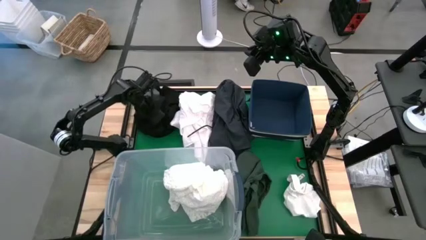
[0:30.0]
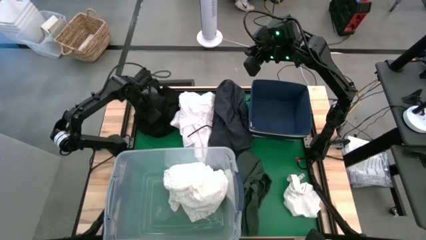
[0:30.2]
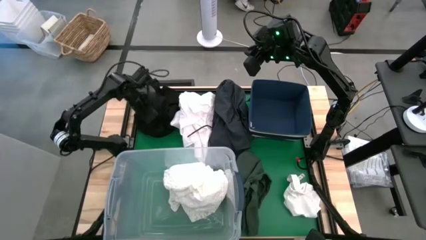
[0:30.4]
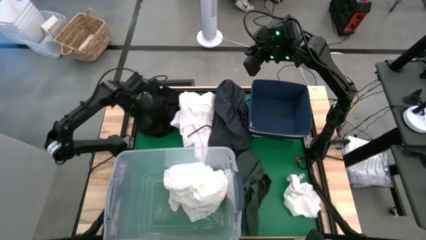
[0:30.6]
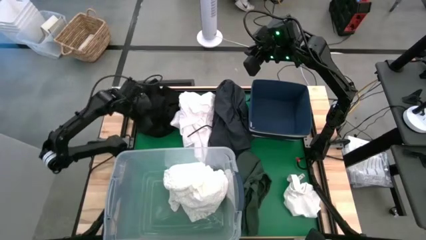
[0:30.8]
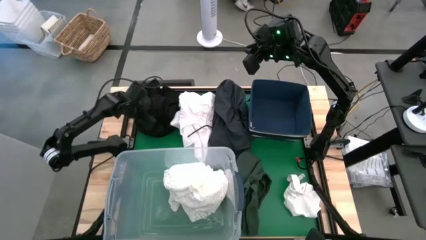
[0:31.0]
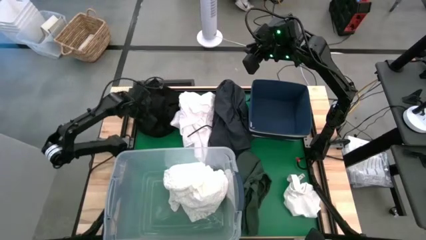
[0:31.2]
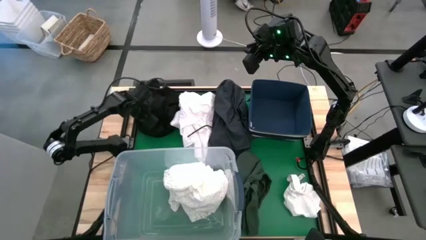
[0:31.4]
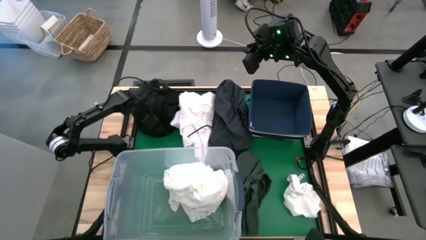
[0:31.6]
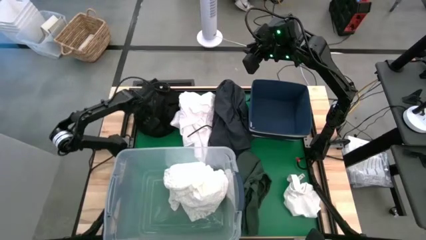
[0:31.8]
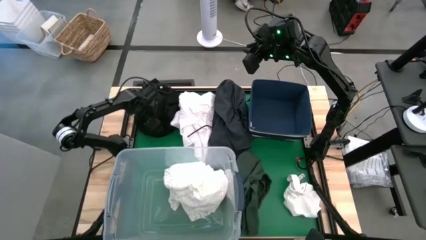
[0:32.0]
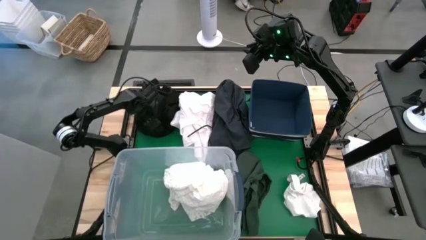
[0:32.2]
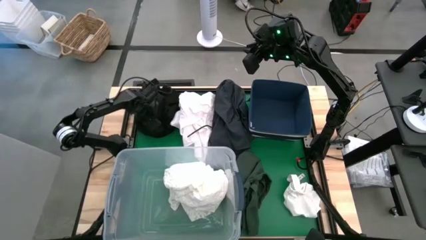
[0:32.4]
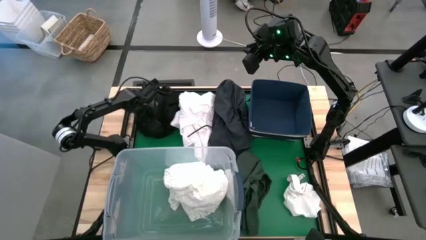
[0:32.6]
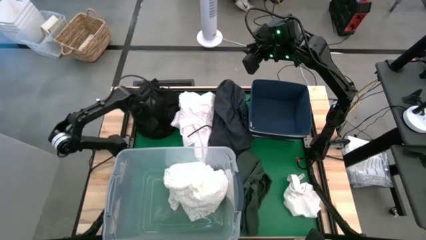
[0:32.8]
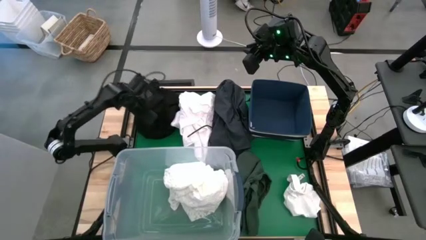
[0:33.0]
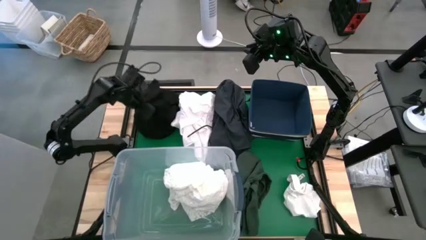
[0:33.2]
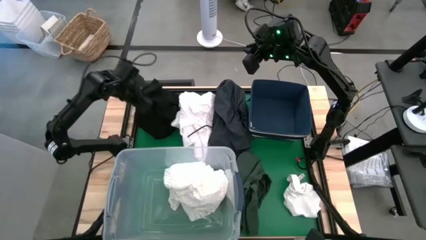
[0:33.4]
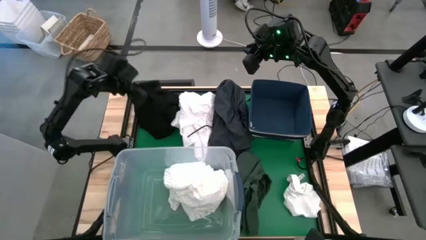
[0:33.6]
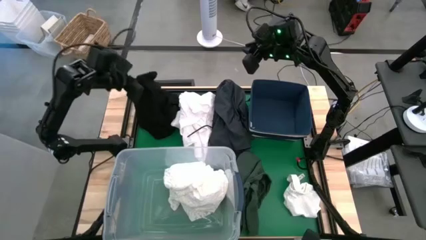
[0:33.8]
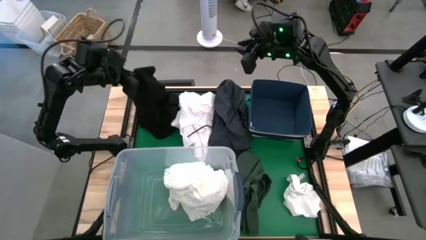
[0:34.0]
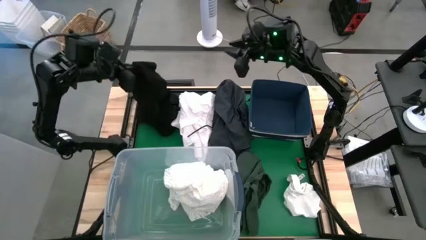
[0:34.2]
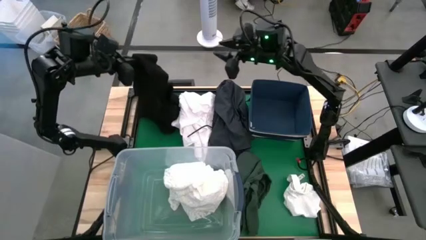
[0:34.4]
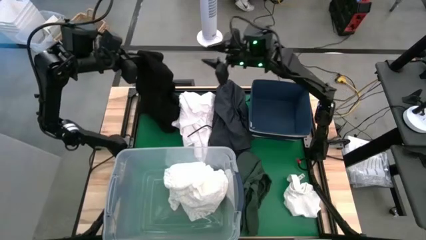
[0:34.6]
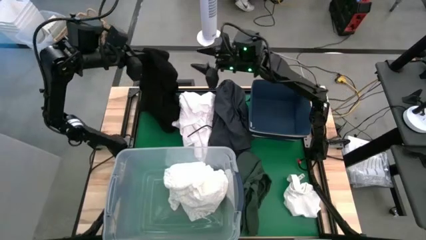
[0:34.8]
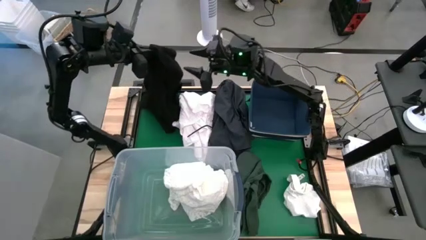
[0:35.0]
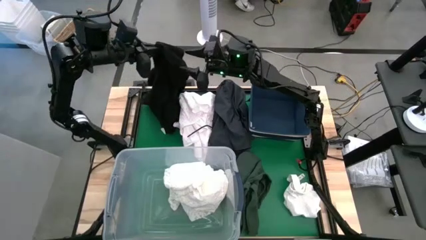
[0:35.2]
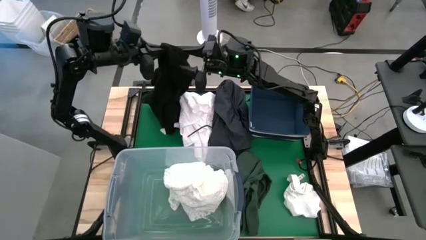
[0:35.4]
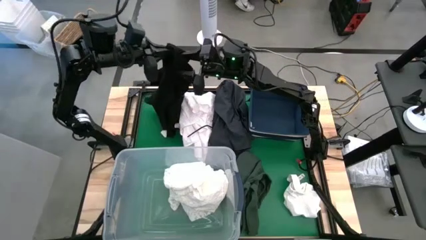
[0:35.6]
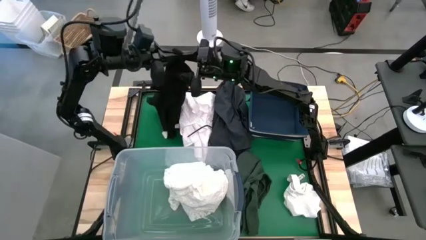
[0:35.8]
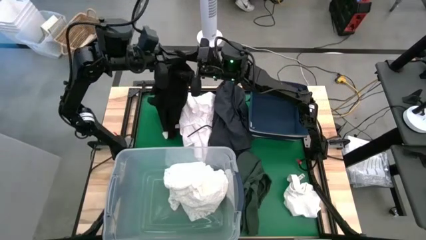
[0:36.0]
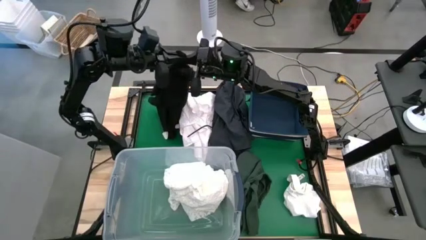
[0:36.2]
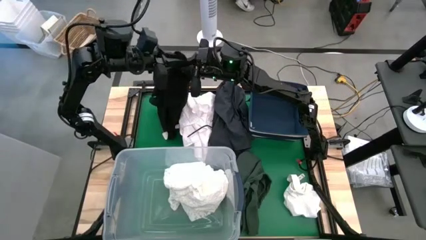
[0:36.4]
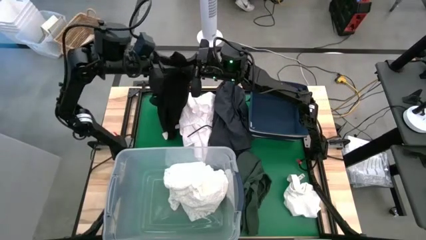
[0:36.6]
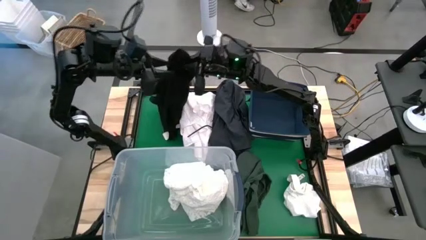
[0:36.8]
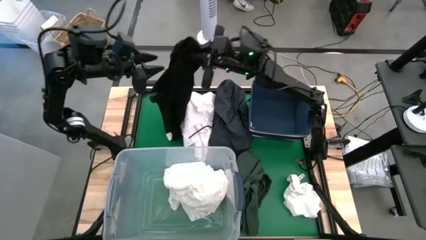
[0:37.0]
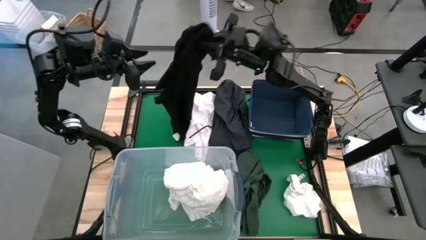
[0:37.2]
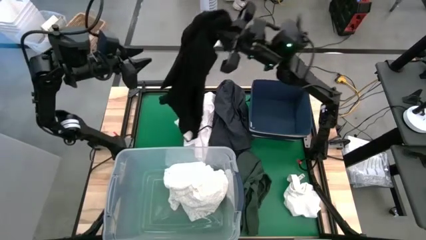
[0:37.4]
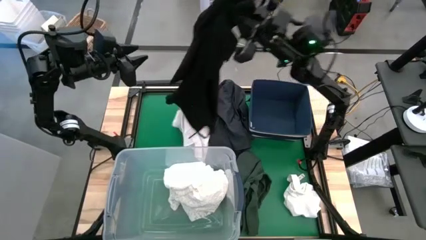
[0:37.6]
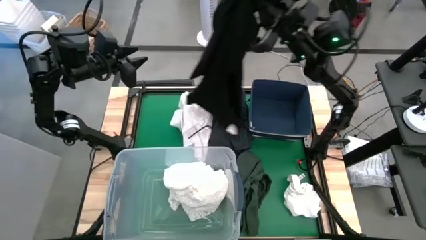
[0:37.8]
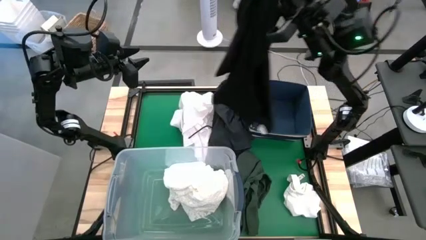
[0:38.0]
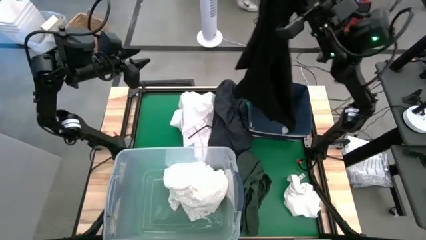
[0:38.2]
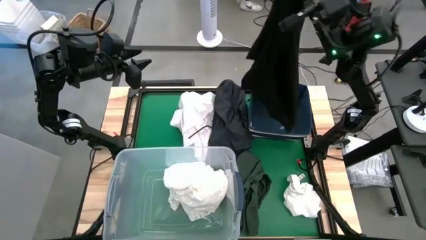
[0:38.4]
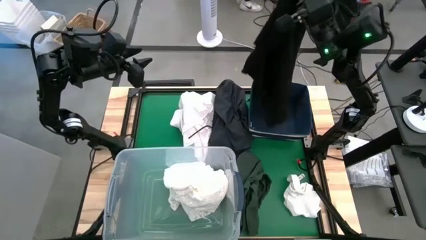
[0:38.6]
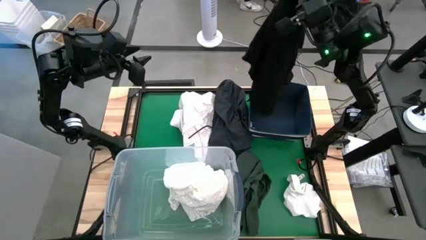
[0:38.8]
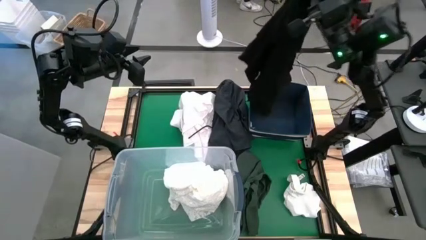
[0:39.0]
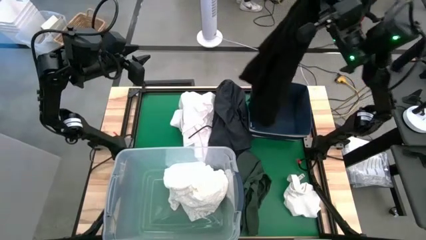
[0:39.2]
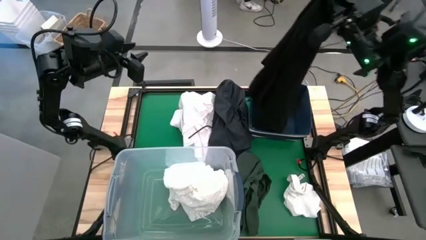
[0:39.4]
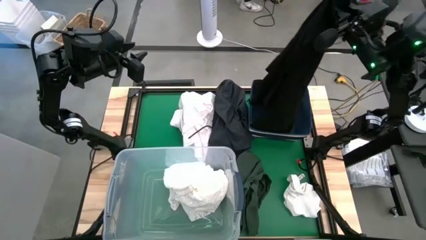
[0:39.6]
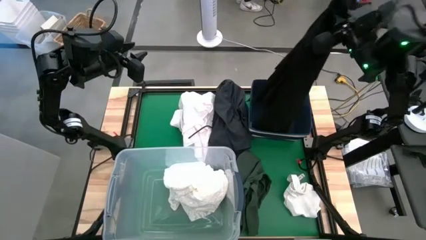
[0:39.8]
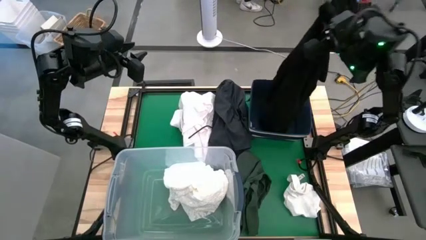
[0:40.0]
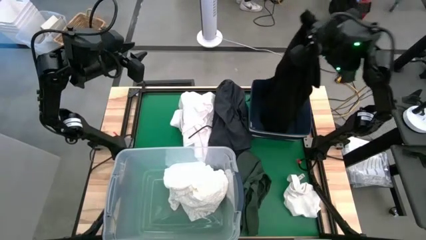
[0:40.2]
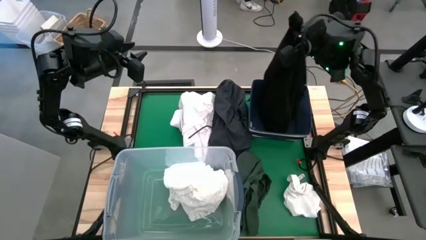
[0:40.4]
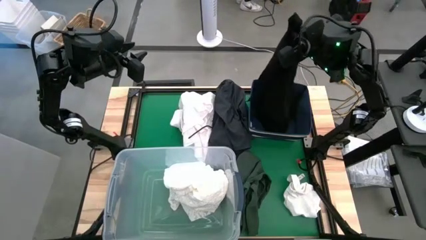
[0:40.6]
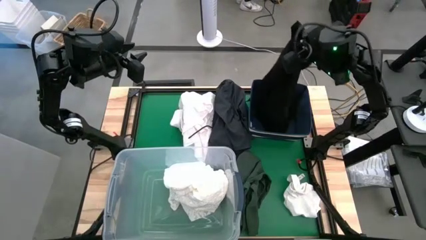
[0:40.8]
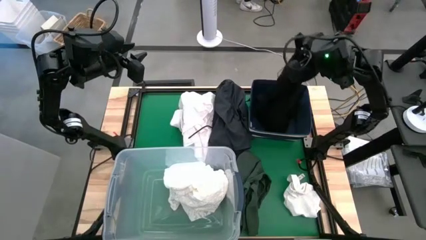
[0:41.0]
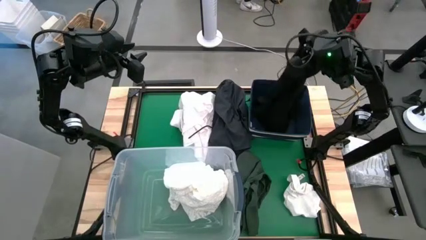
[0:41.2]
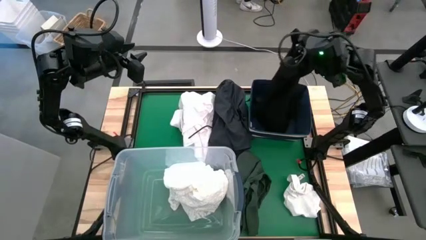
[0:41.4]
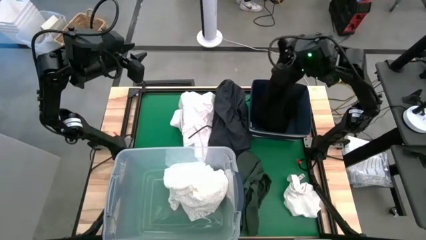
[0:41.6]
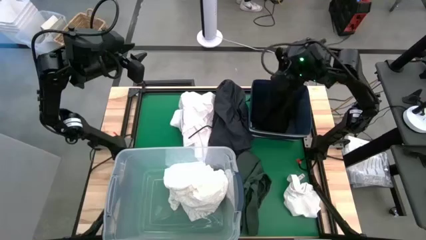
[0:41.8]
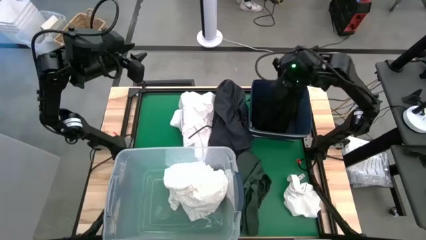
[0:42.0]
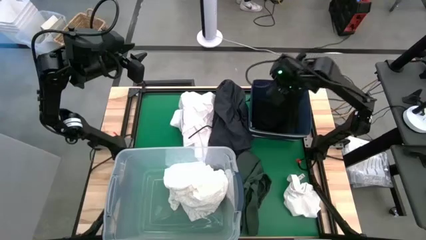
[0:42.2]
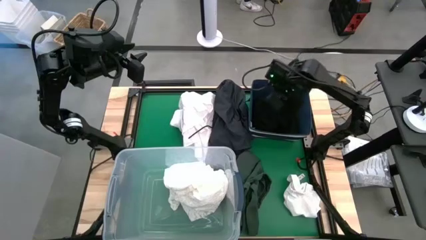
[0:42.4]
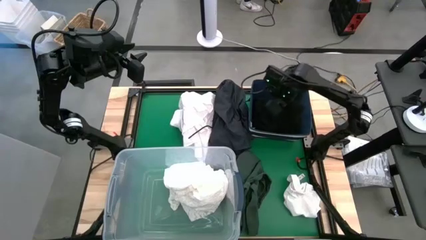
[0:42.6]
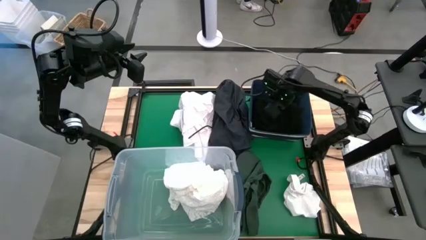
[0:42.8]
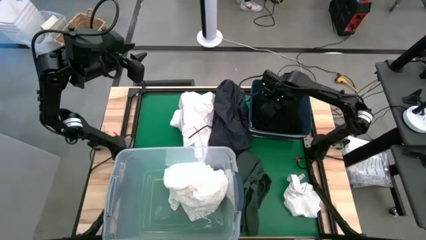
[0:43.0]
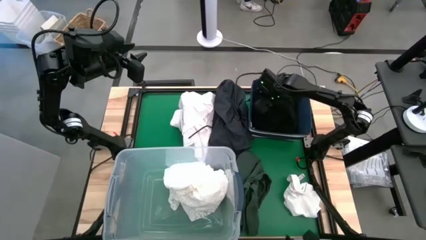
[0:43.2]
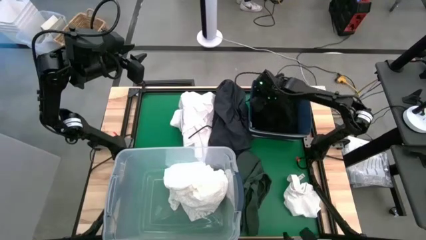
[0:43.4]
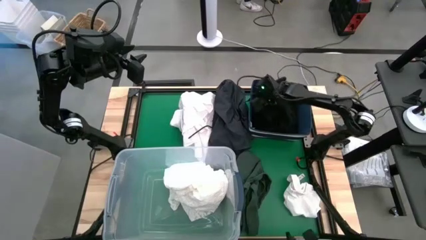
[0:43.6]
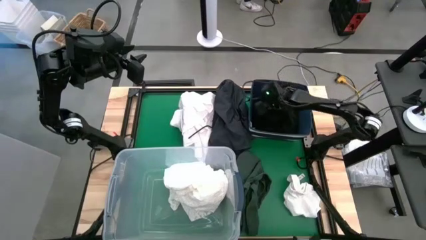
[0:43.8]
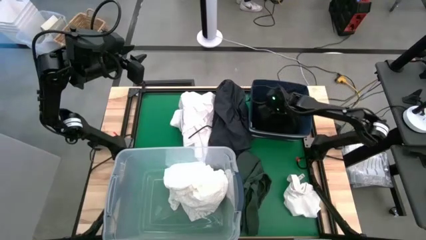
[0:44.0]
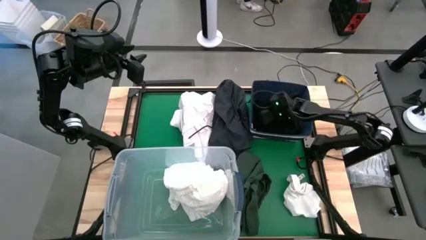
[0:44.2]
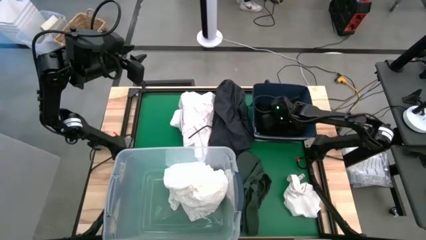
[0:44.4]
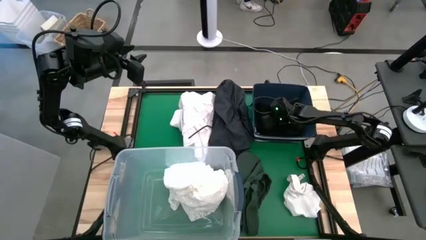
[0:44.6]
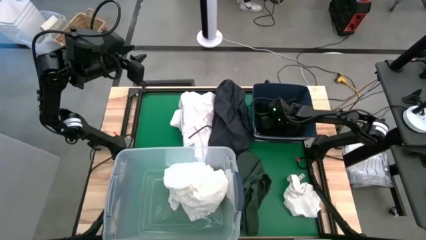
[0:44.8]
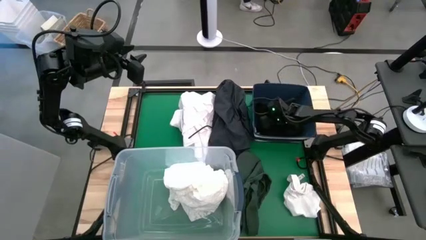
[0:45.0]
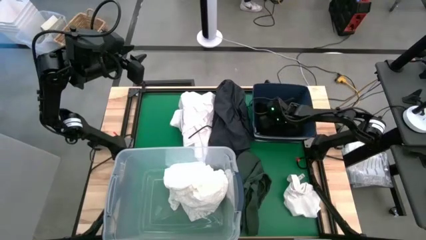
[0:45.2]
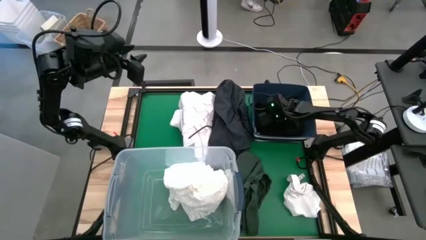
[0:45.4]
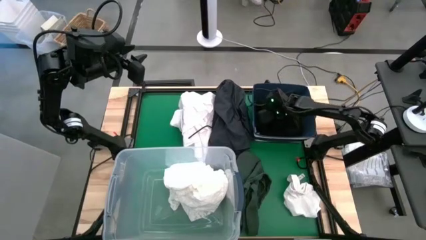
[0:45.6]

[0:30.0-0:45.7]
Put the black shirt into the blue laundry organizer
